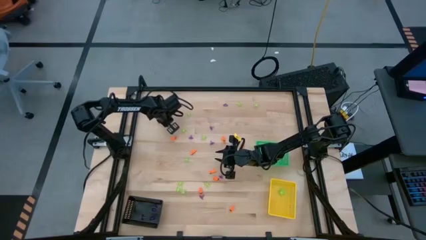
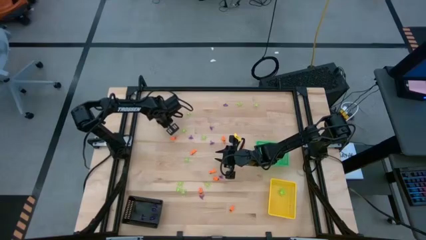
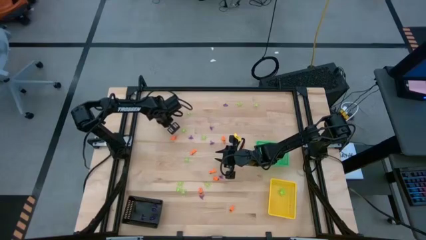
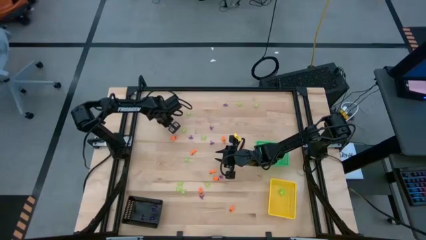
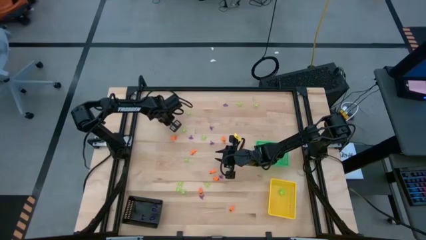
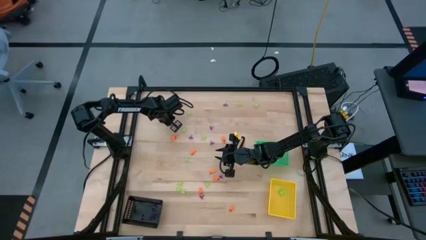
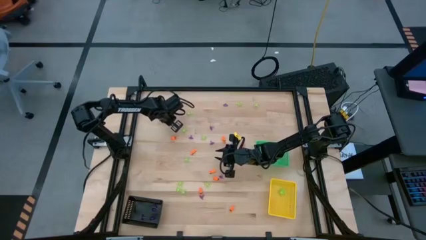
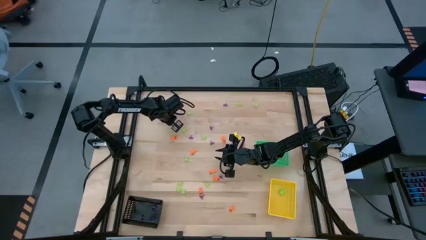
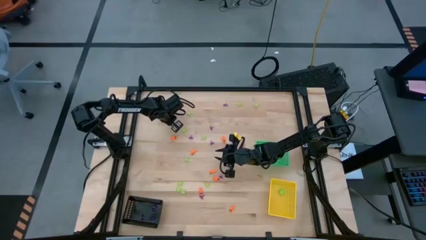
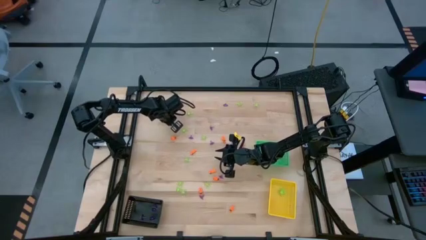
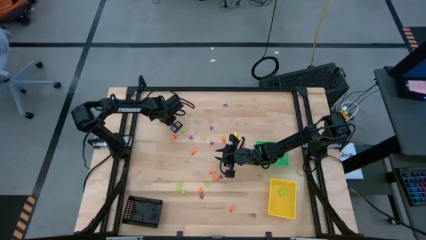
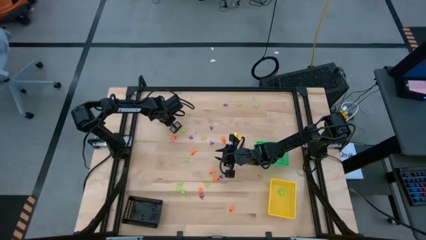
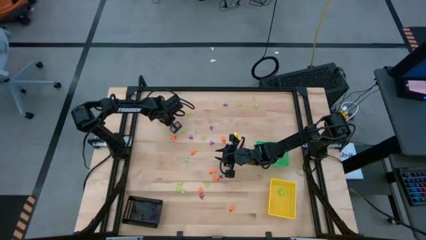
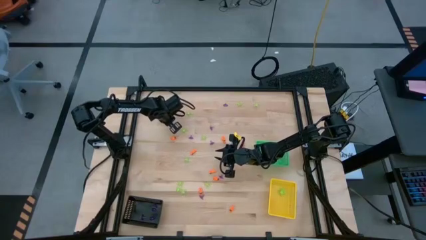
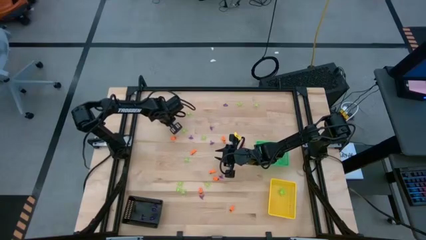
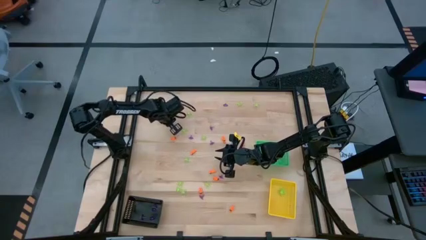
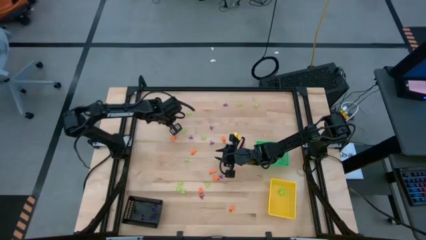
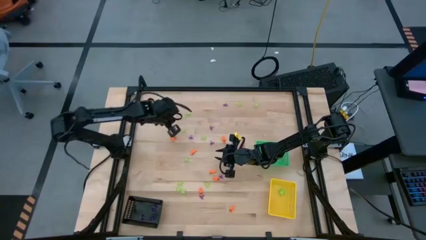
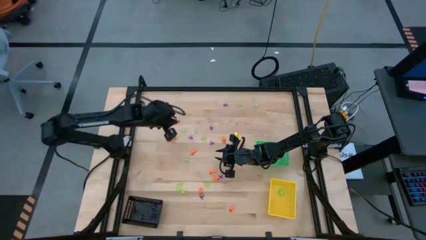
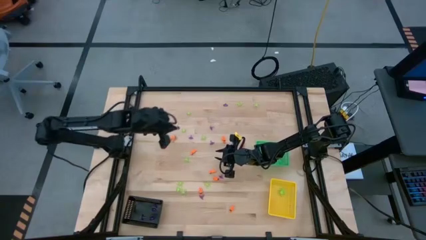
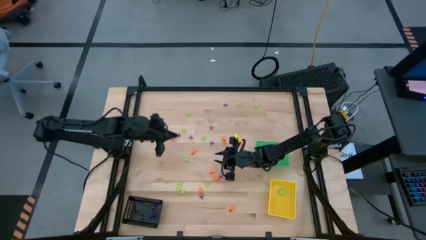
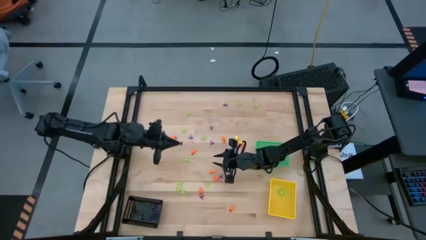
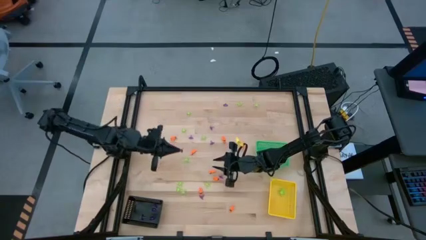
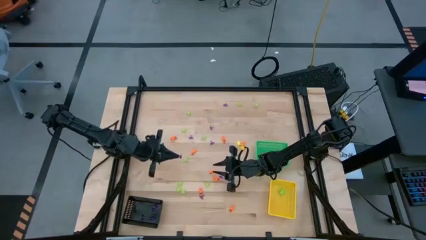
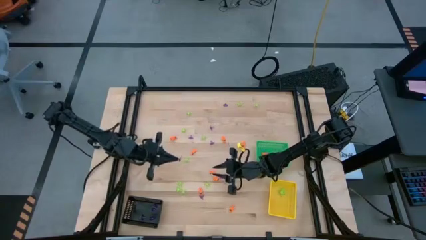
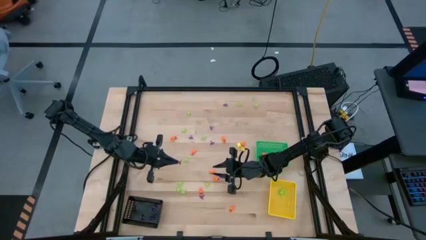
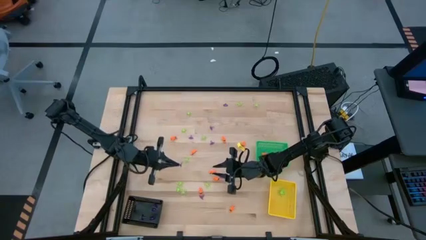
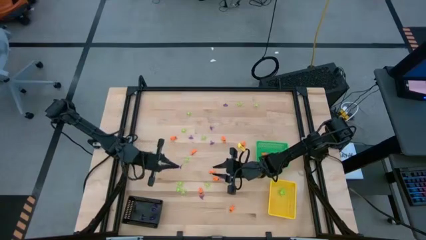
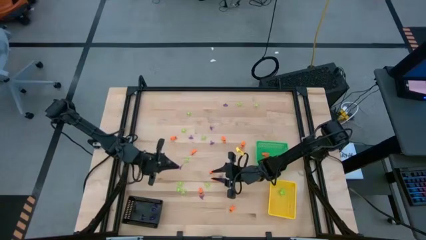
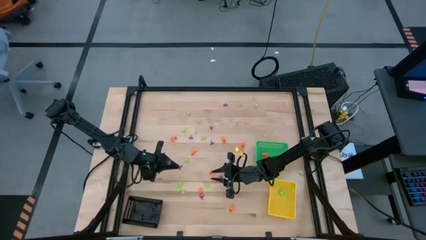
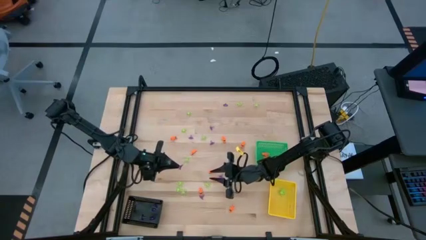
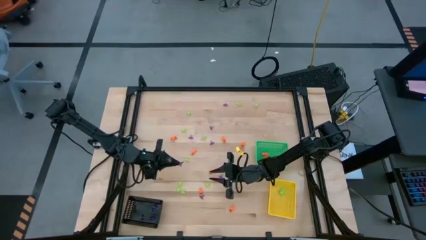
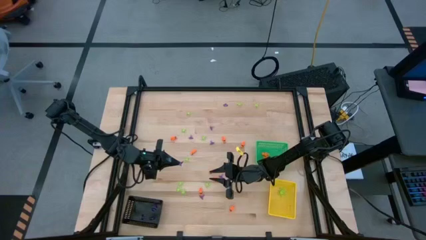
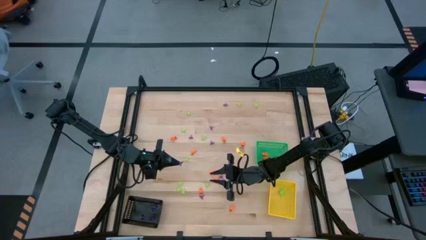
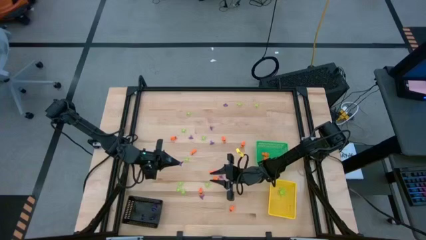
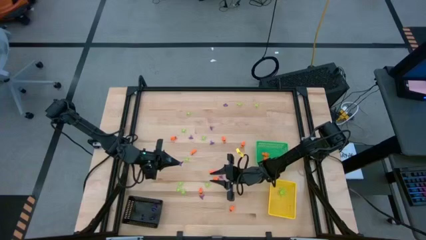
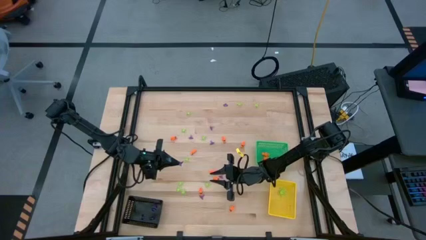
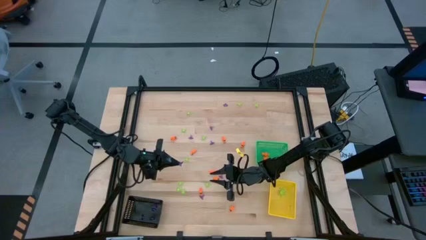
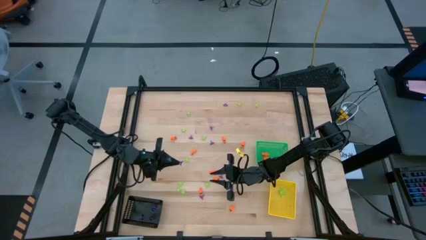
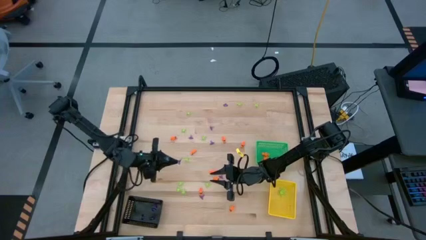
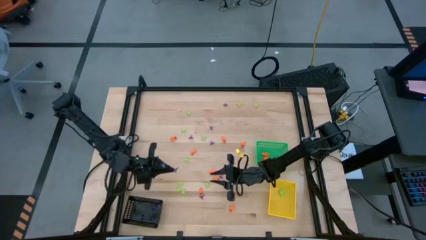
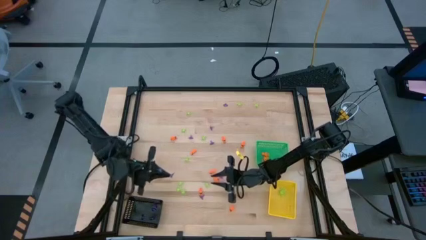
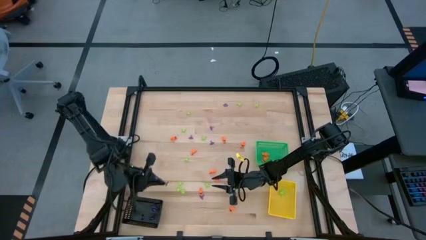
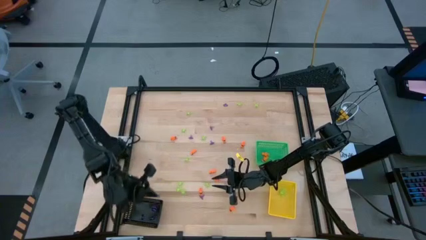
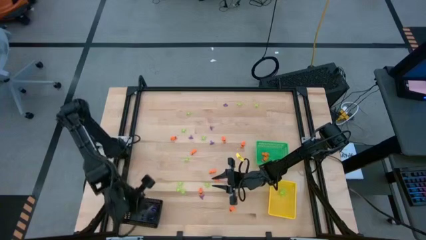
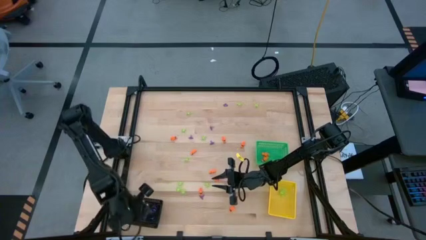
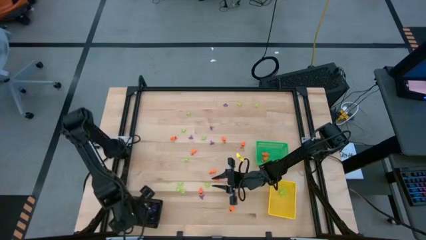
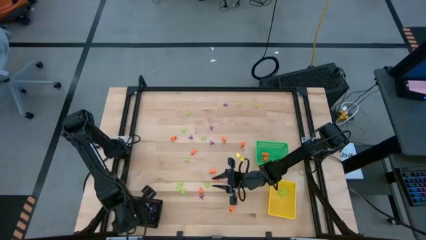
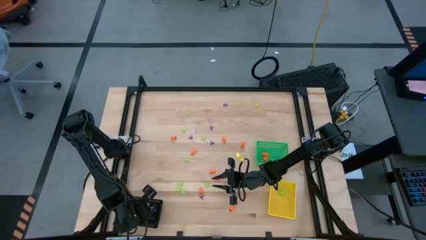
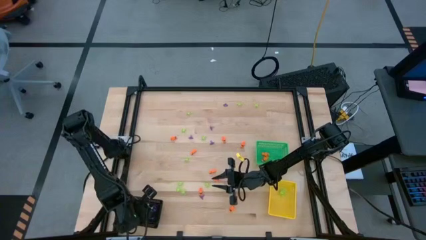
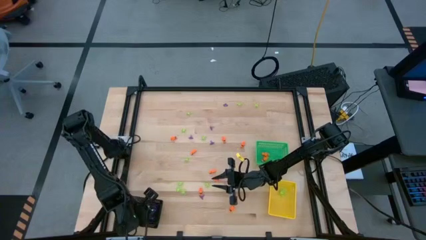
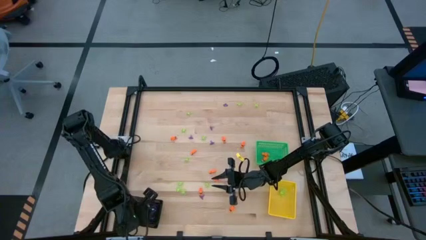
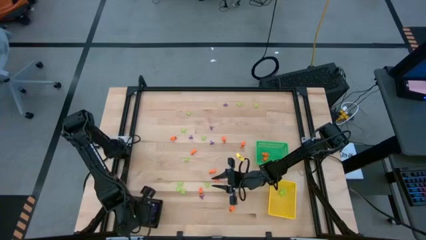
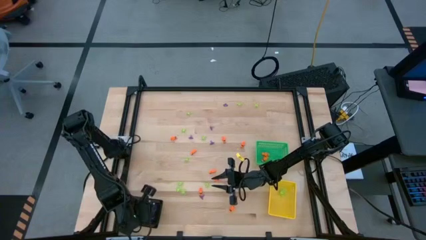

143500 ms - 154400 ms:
Task: Sort Halloween decoration
Put the purple witch hat toy into the black bin
